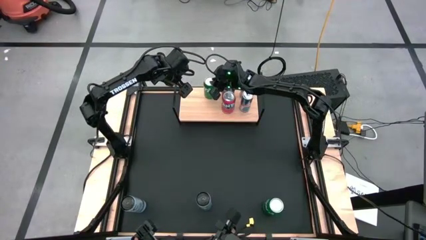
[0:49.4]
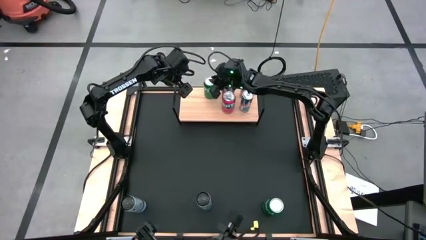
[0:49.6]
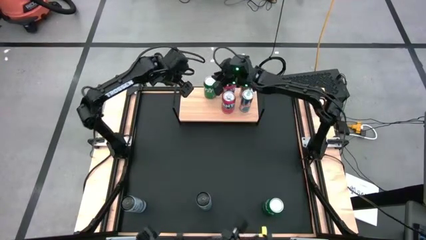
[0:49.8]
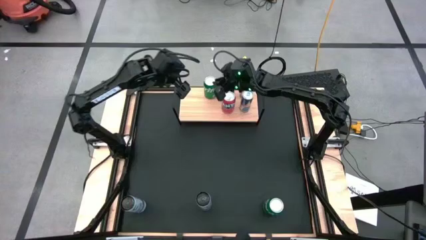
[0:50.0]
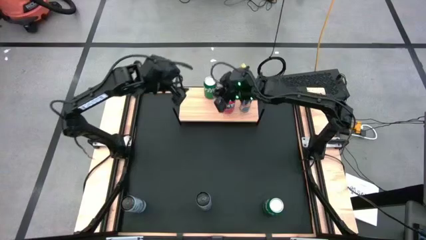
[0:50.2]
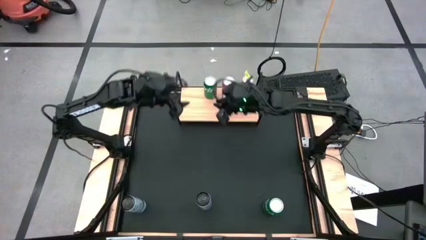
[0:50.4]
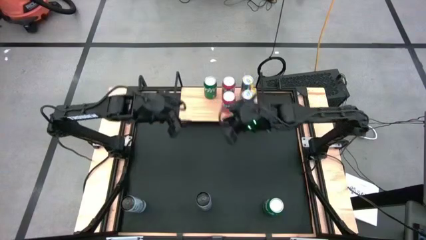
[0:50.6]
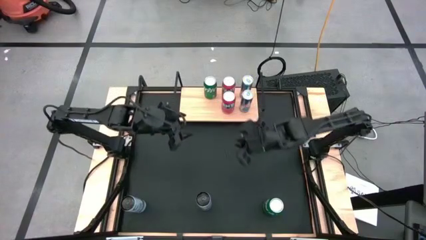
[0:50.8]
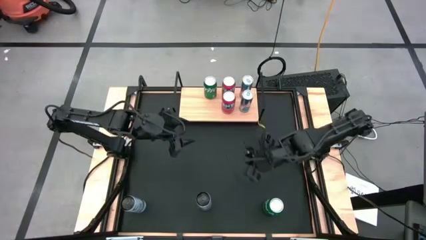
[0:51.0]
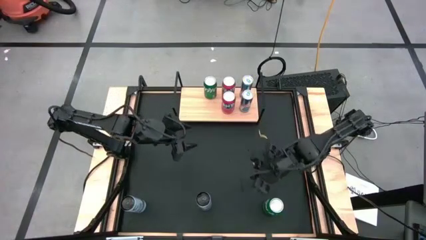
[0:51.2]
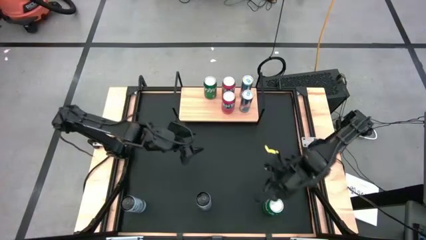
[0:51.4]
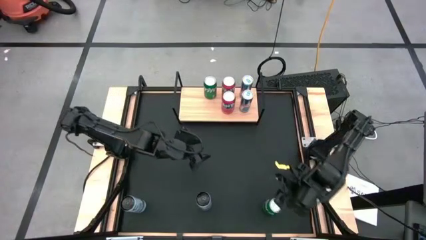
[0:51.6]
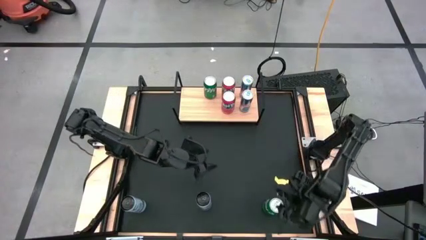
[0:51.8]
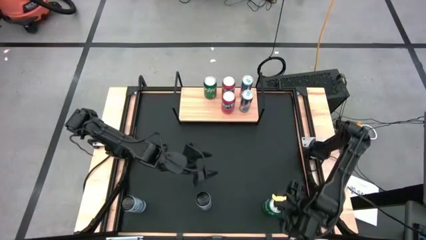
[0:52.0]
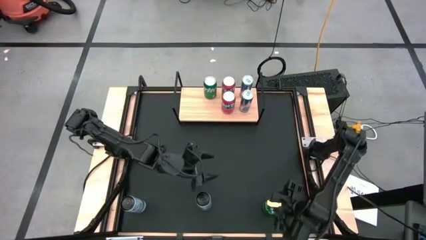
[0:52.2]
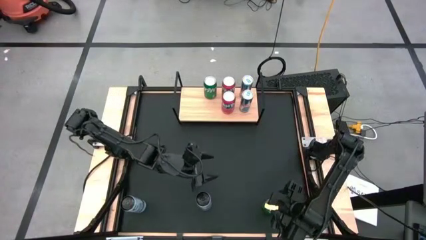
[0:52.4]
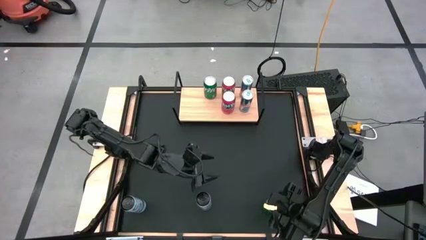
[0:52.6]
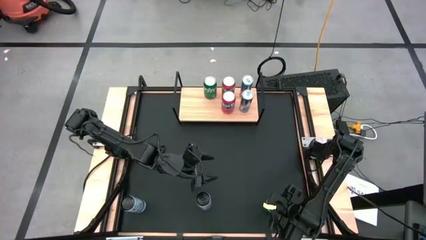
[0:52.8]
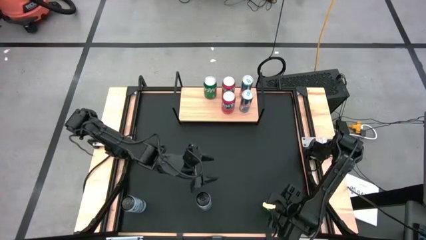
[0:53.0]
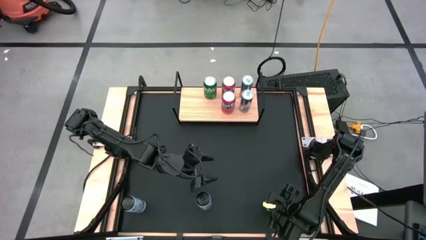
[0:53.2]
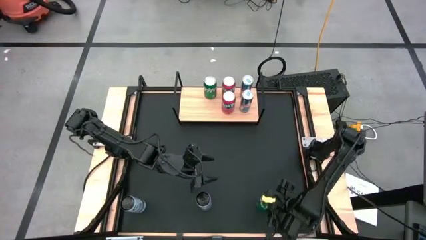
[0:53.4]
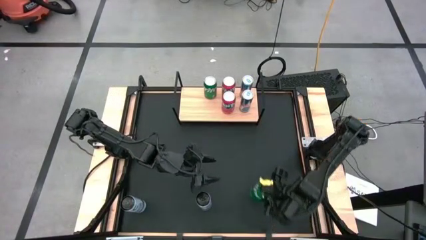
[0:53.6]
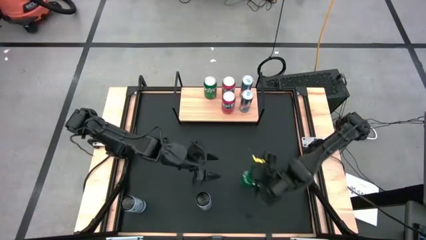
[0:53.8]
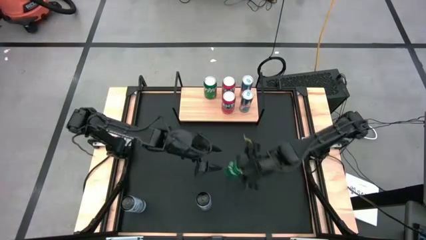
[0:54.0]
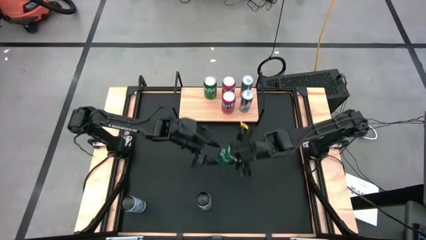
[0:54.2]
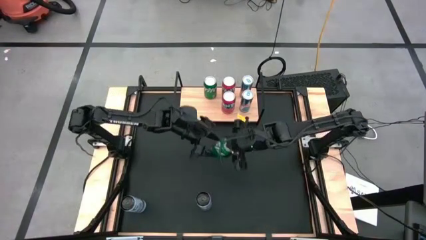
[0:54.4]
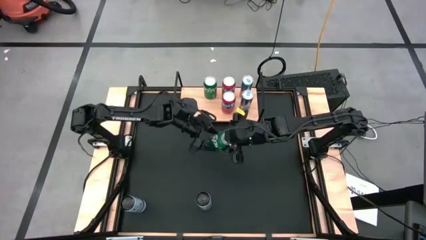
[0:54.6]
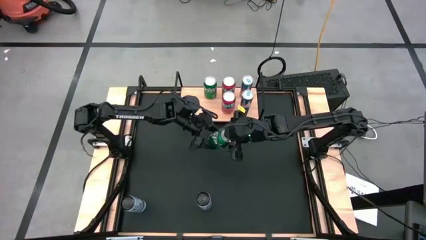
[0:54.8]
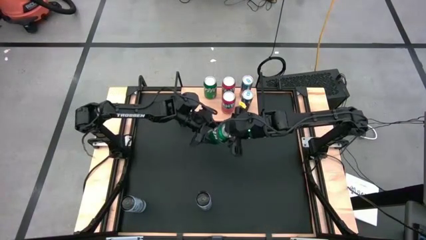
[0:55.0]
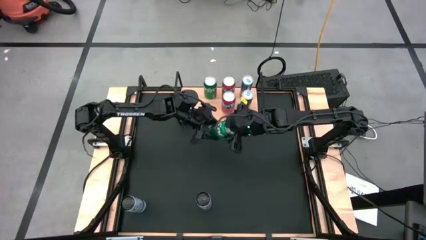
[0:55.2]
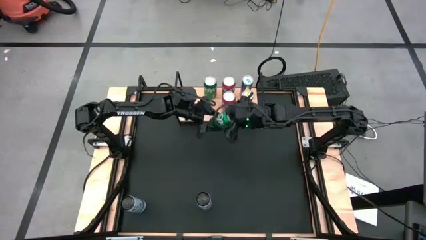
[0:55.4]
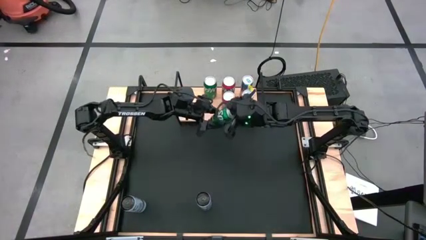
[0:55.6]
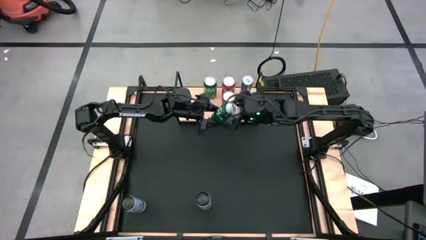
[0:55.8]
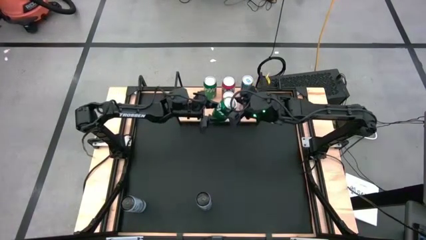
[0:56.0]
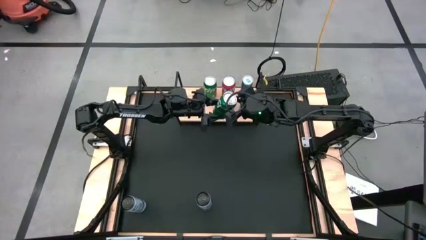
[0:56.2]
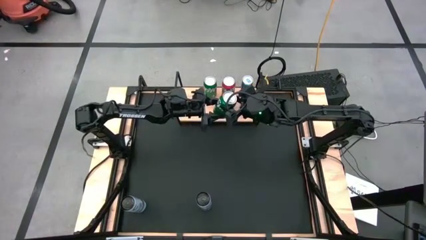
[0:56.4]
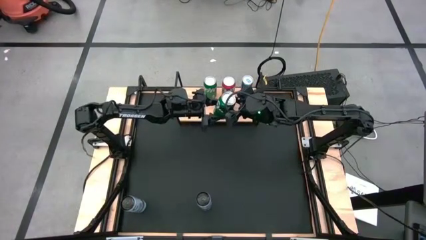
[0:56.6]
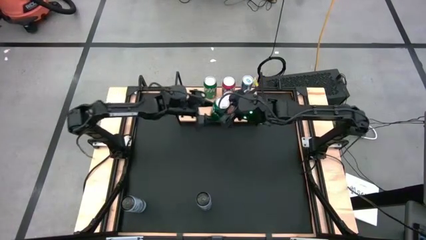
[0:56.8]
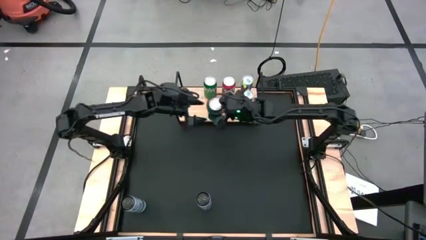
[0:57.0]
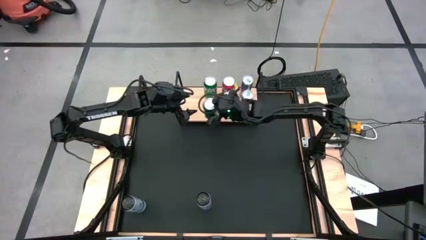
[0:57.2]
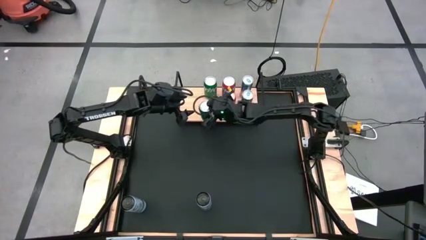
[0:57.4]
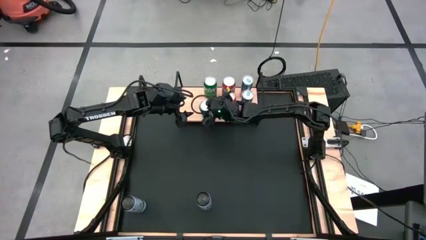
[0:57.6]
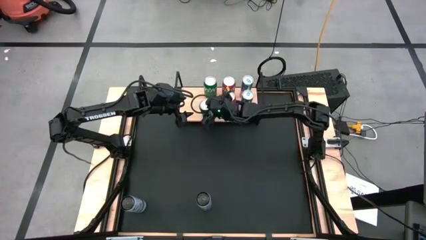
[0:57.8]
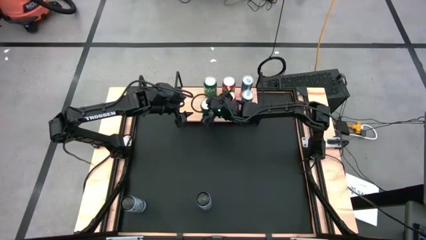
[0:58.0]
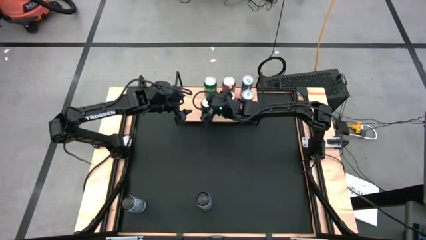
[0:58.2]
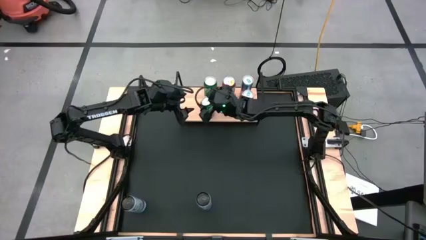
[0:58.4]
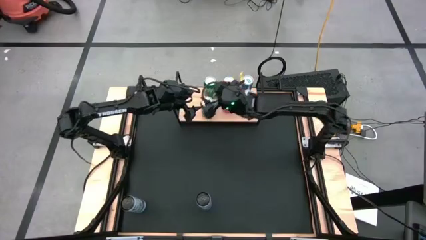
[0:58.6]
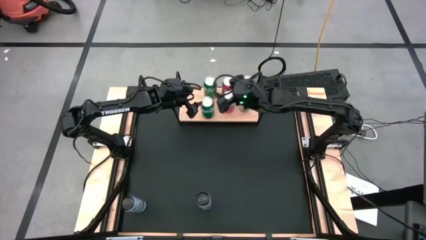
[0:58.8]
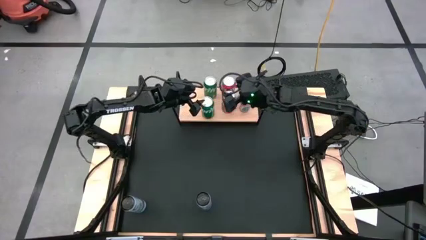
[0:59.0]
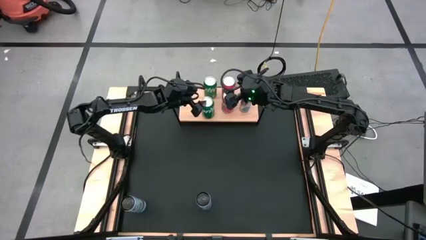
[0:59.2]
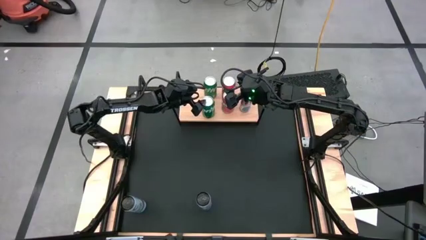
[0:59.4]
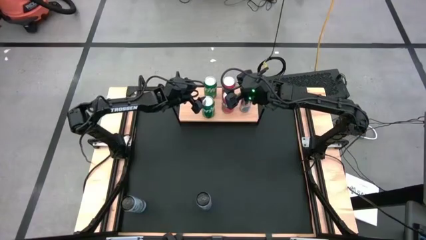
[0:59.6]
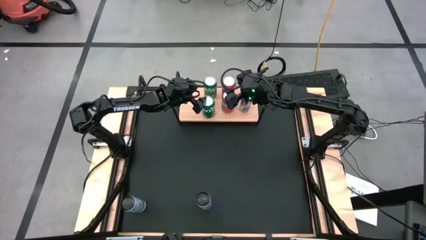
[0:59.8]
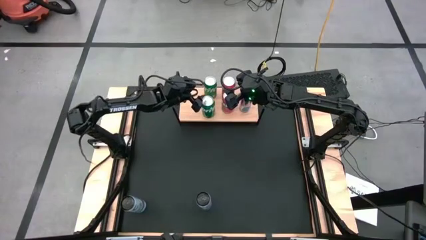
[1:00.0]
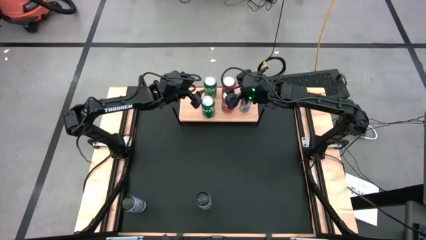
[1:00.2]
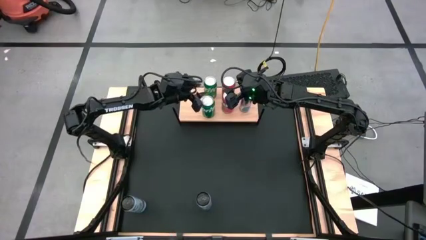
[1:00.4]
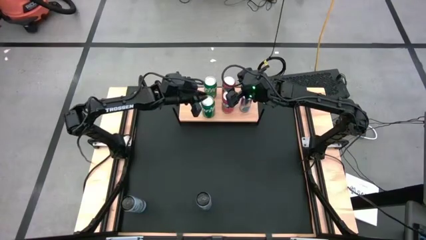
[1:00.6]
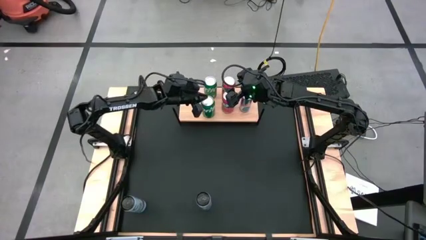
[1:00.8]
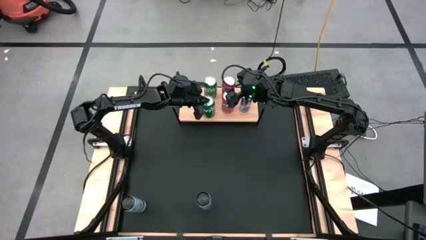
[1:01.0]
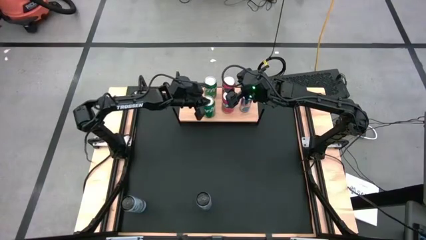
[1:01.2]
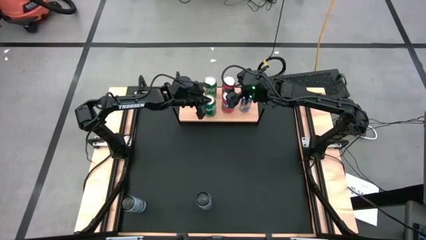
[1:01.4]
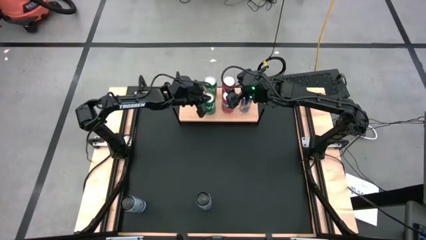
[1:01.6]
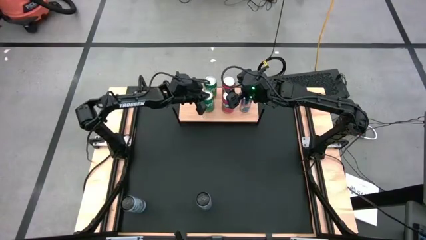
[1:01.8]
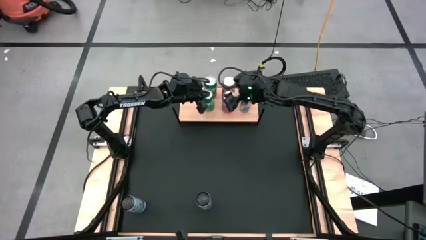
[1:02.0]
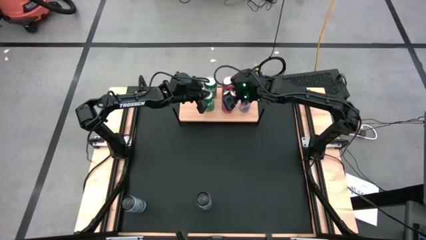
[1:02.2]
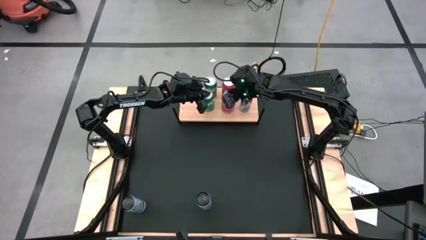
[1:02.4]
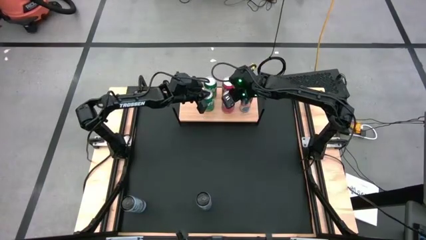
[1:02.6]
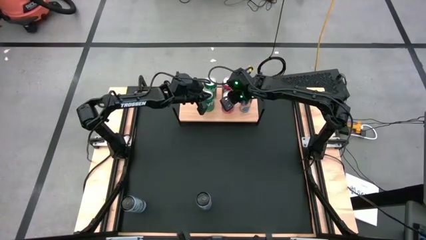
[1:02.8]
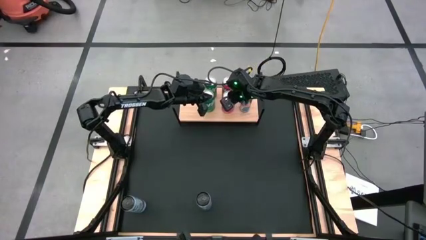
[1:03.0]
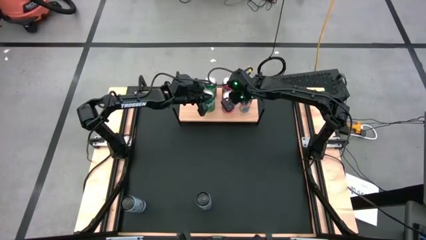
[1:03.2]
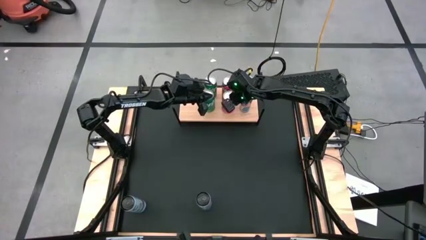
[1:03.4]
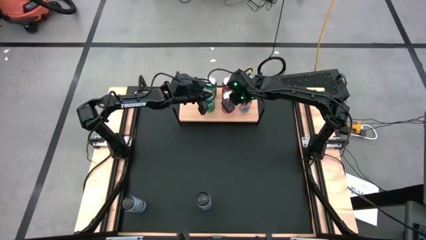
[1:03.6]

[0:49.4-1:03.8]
Task: Place canned beverage on shelf
Put the green soda can on the shelf aligned with the other green soda can
